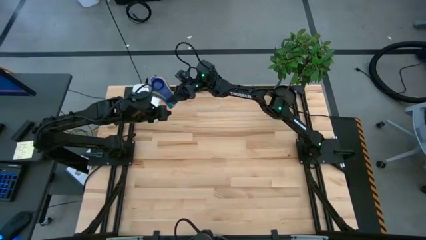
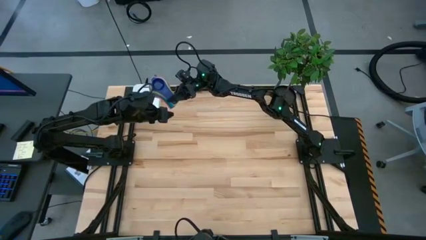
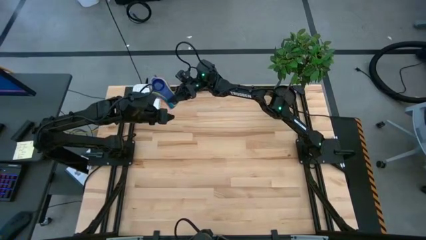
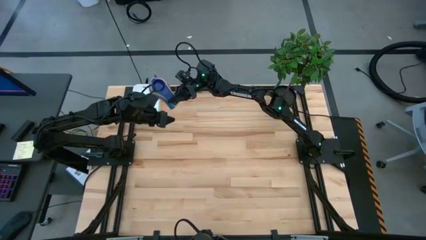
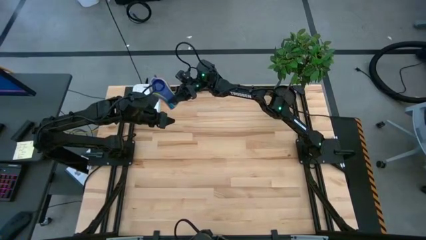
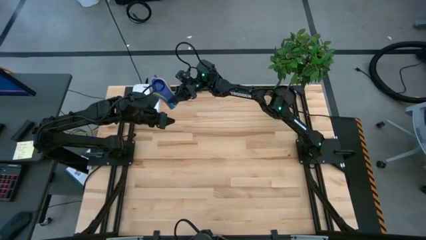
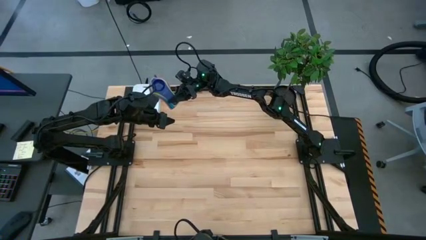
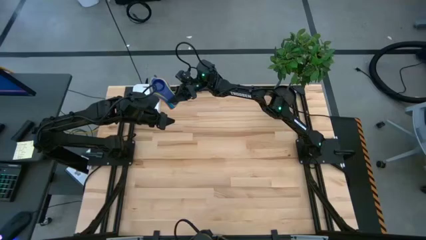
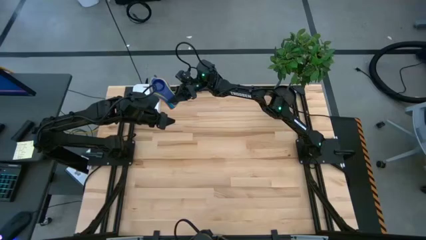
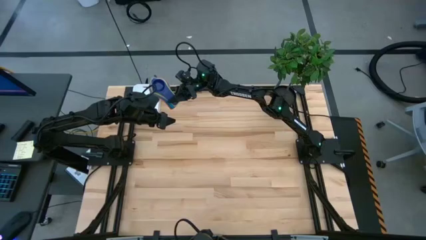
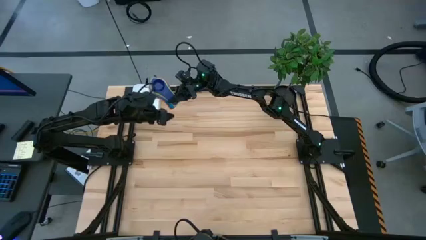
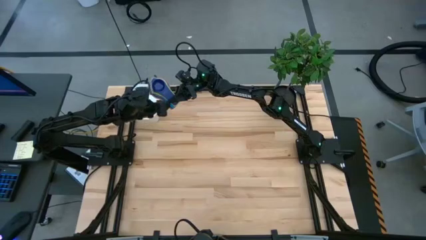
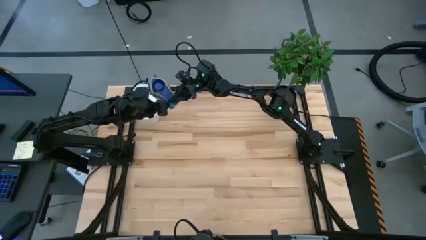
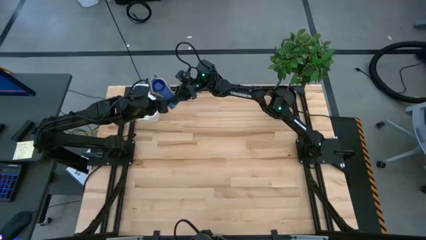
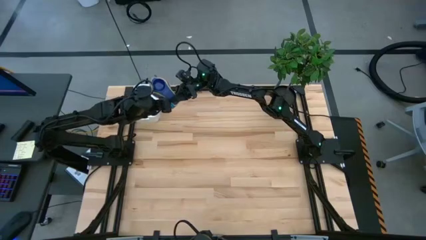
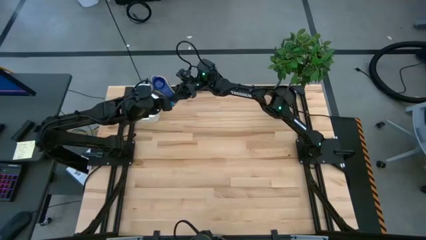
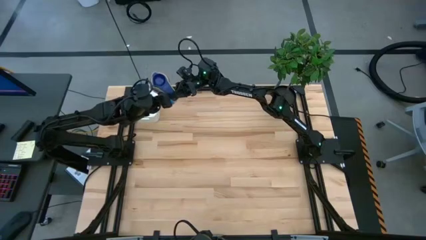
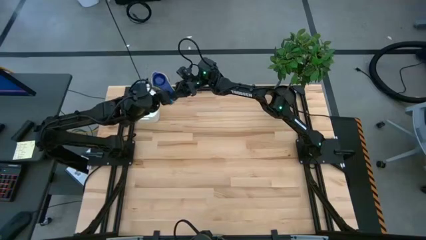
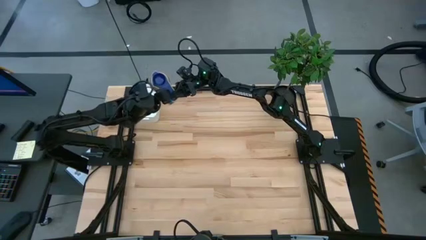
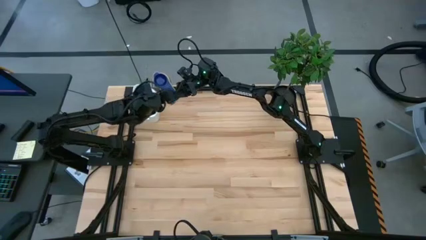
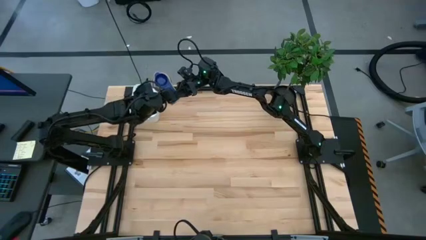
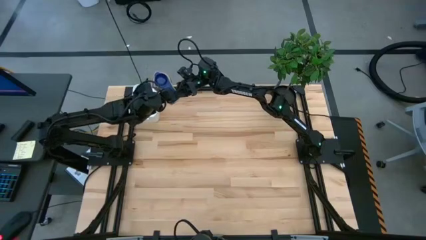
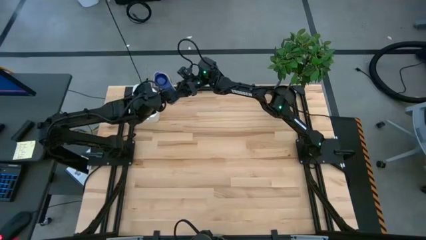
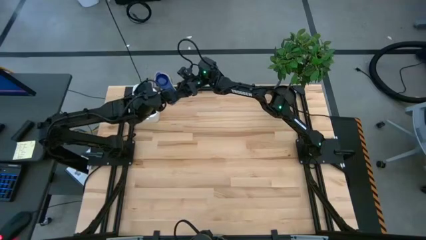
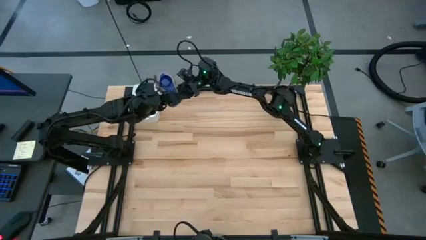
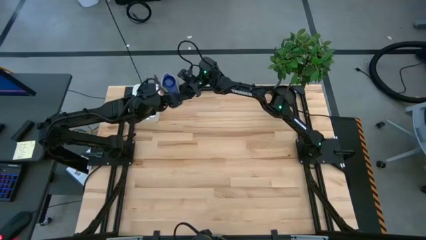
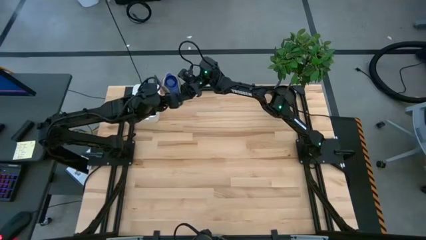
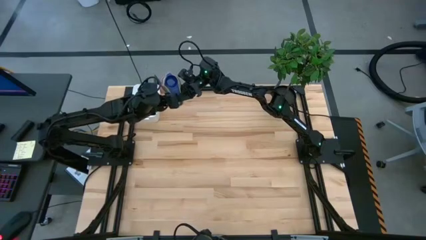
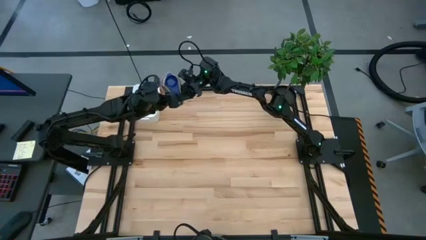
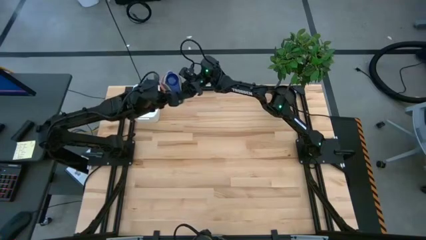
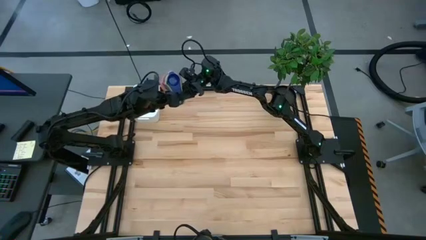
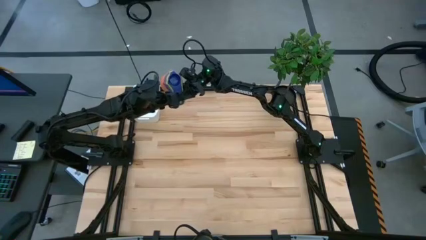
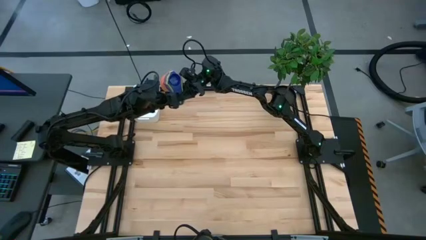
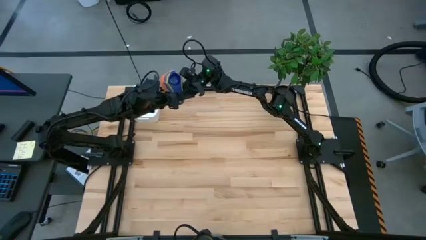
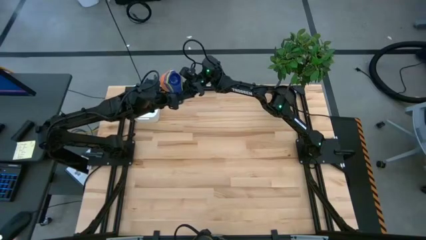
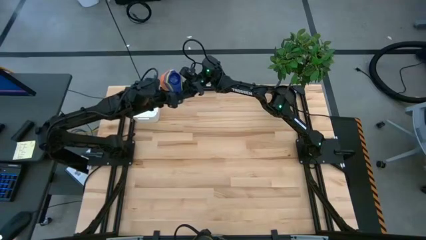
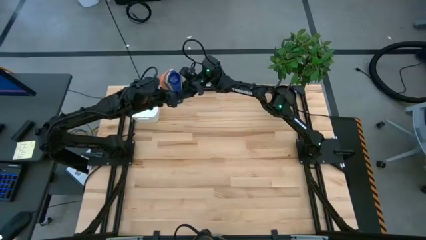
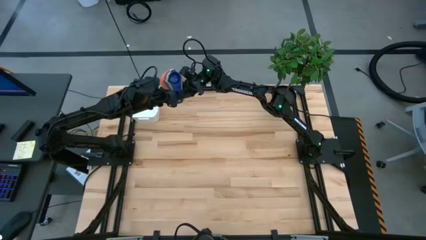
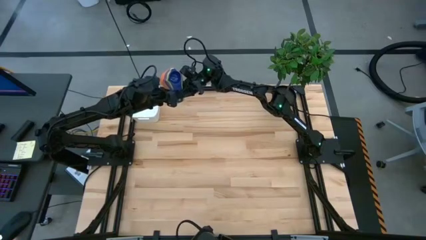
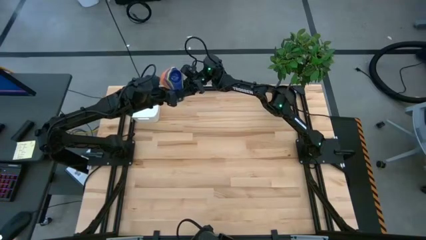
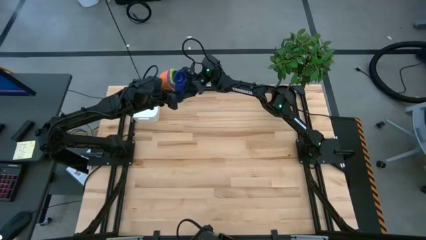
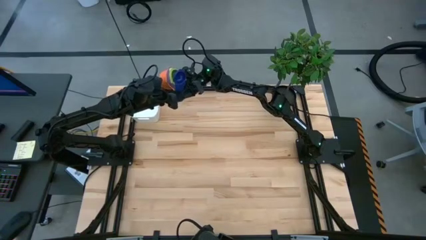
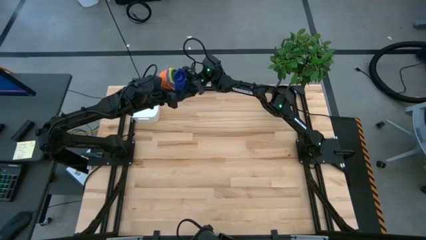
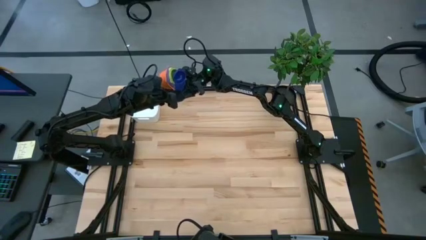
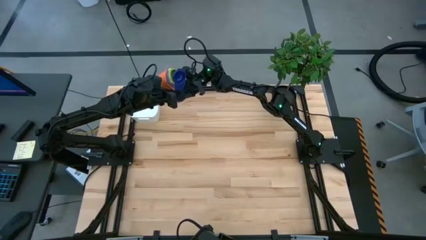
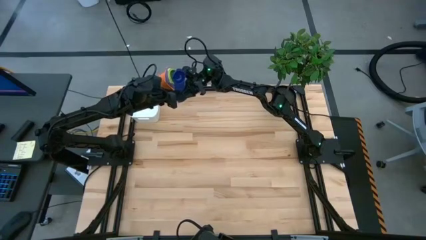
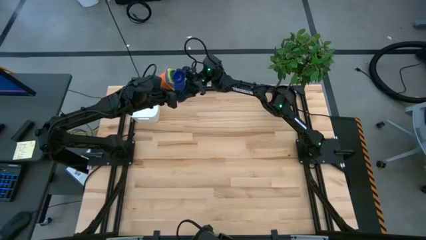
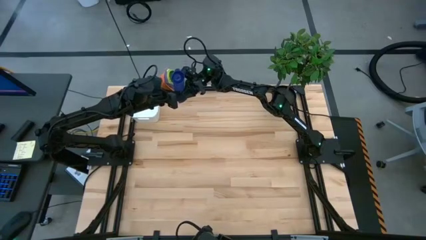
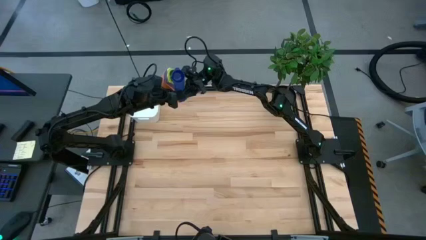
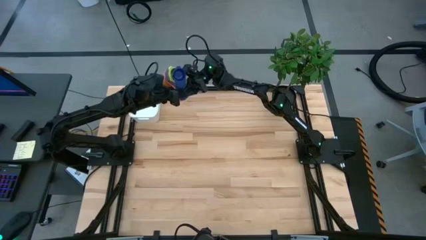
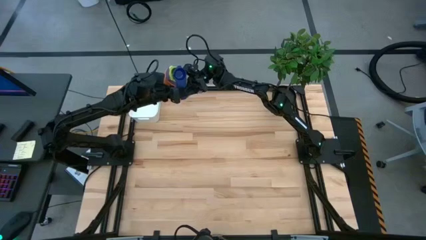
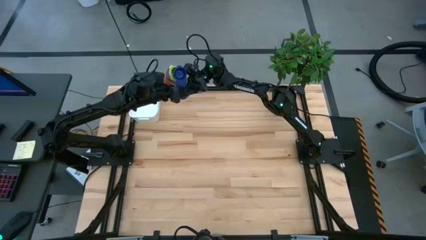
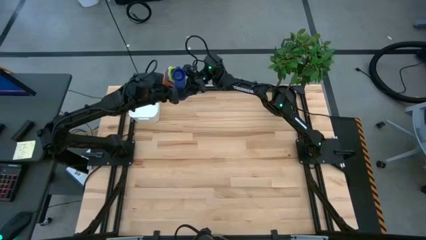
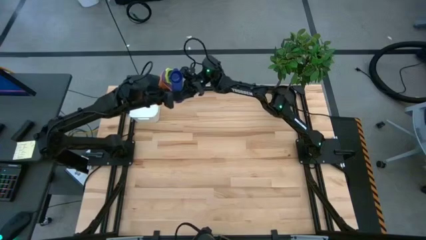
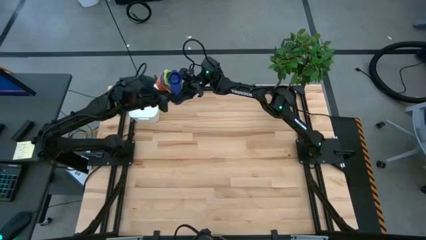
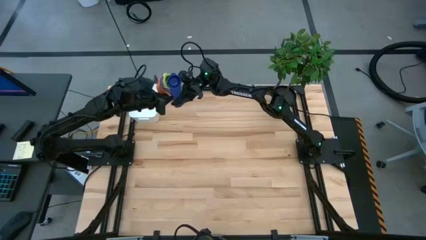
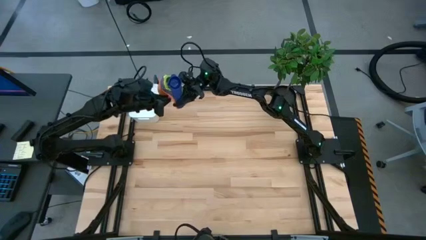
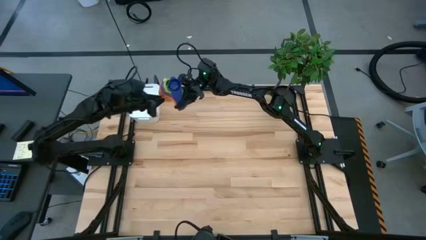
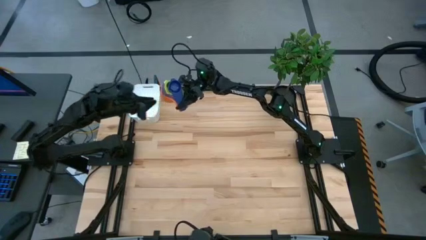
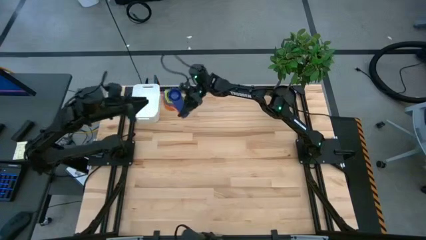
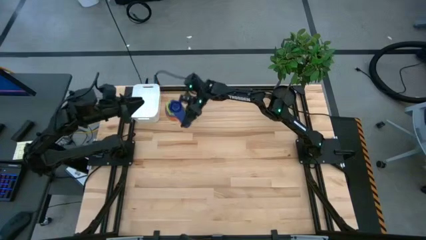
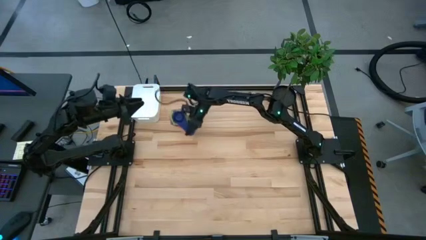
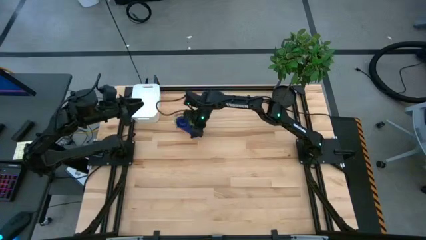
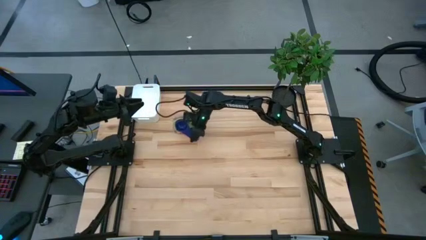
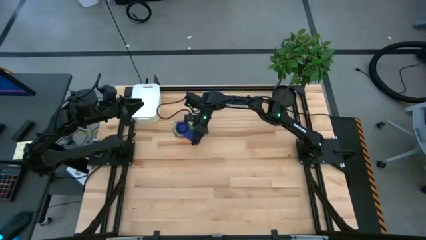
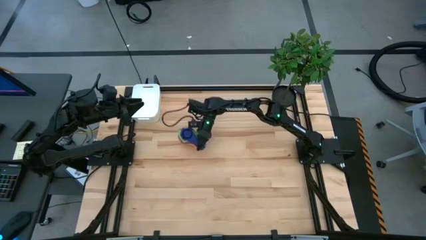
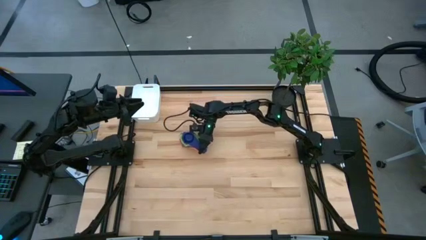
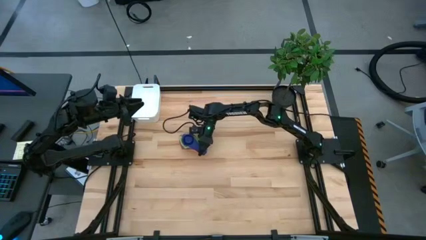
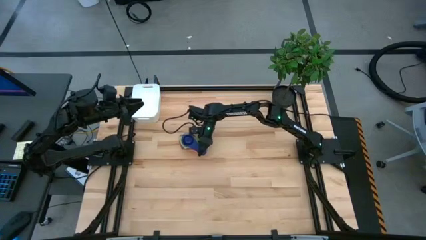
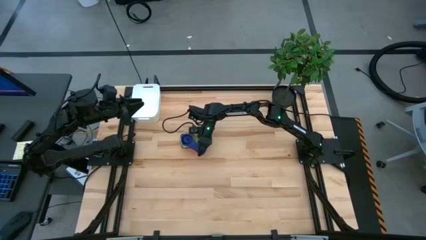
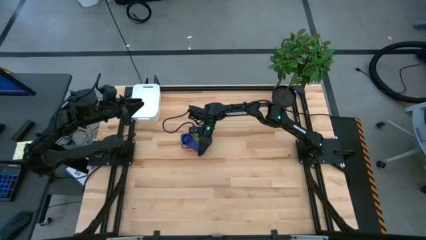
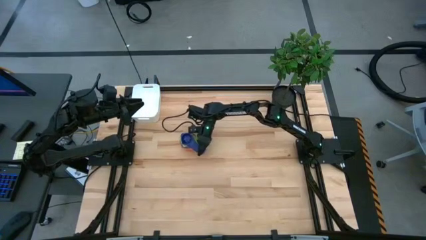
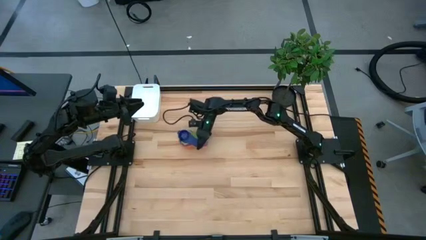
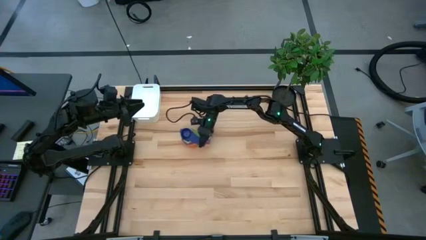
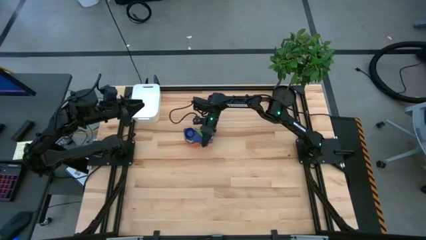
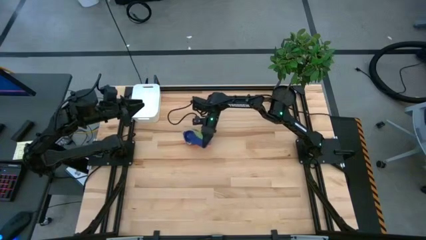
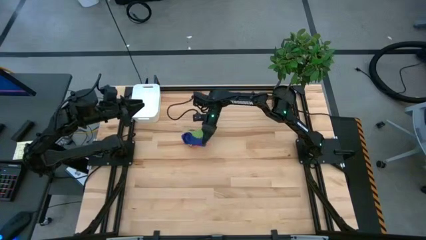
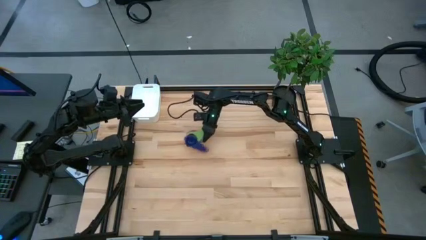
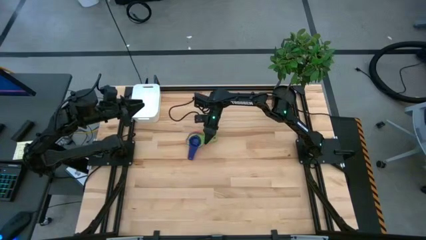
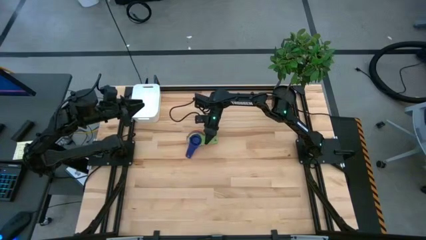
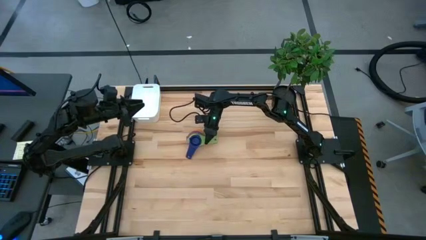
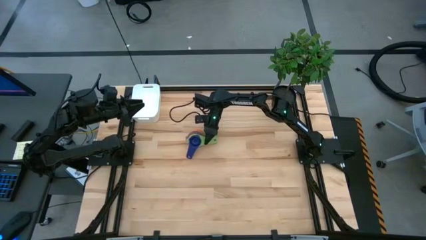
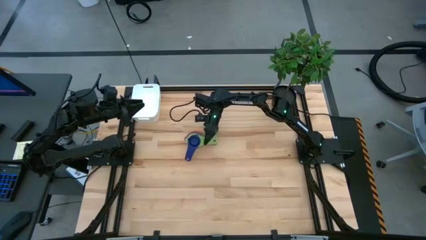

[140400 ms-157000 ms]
Task: Nest measuring cups in basket
Put the stacked of measuring cups into the white bin
